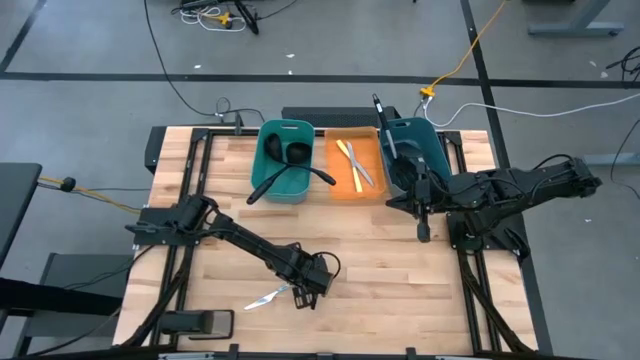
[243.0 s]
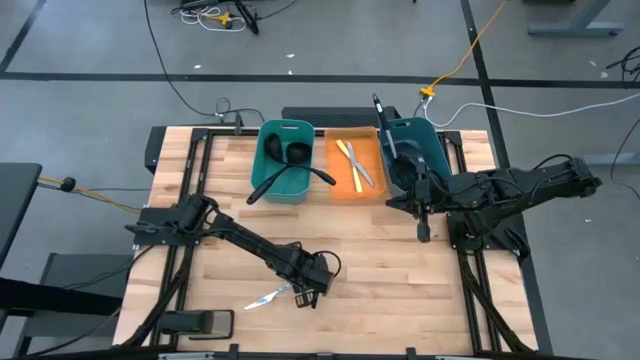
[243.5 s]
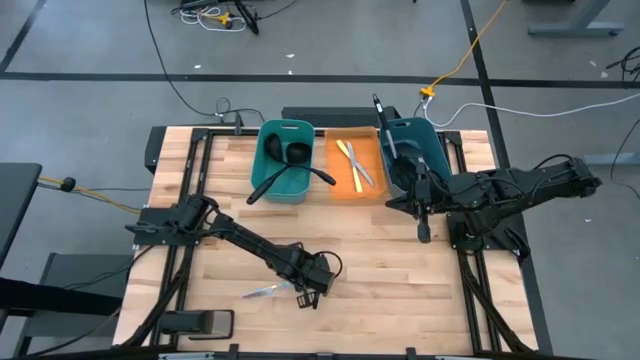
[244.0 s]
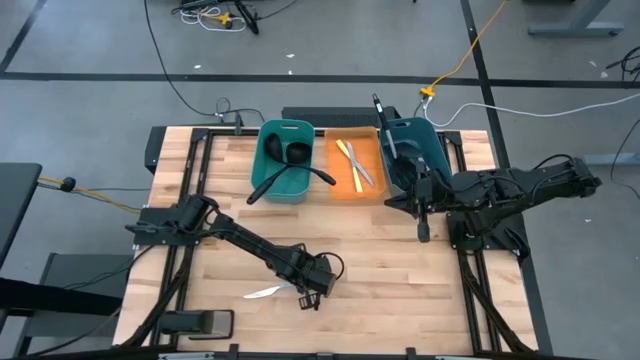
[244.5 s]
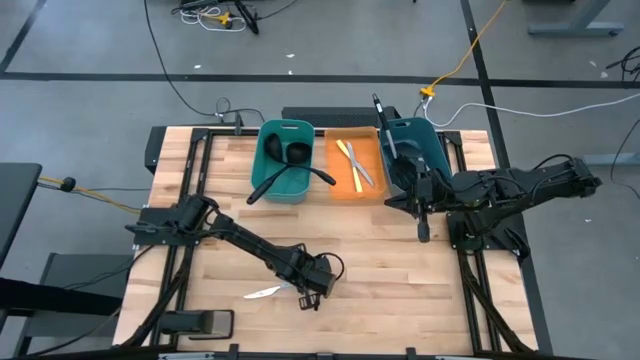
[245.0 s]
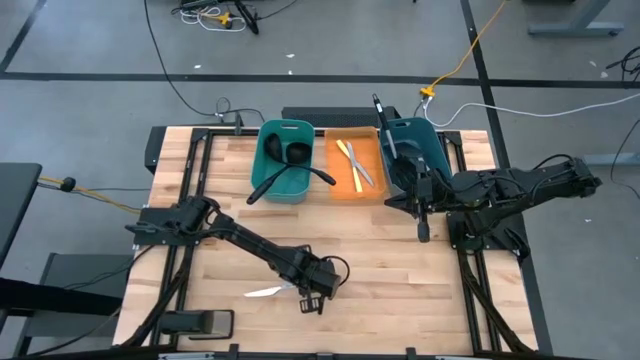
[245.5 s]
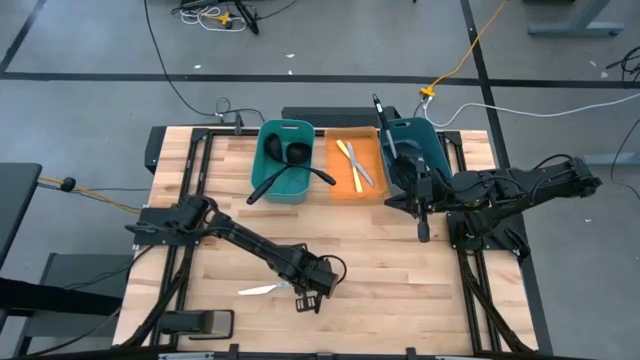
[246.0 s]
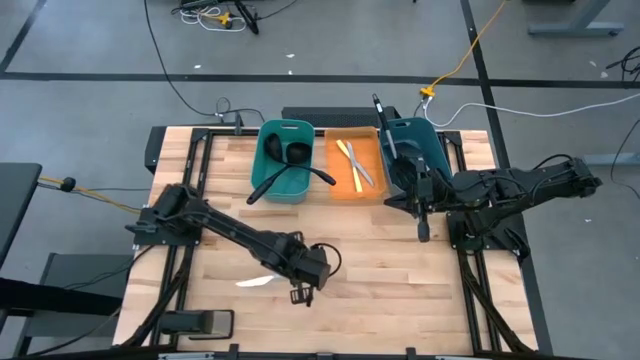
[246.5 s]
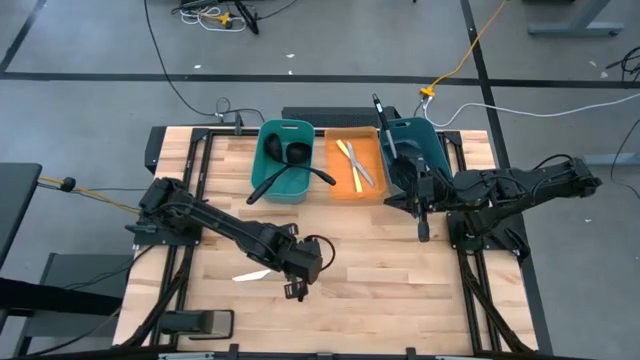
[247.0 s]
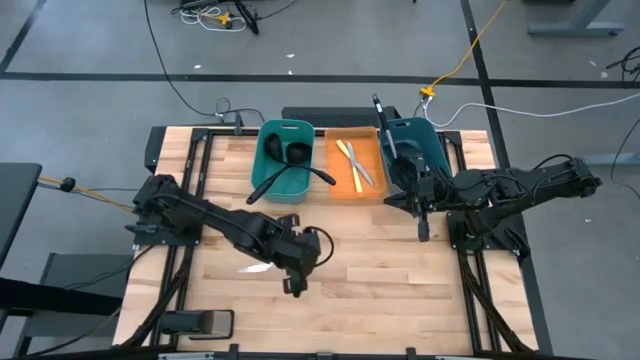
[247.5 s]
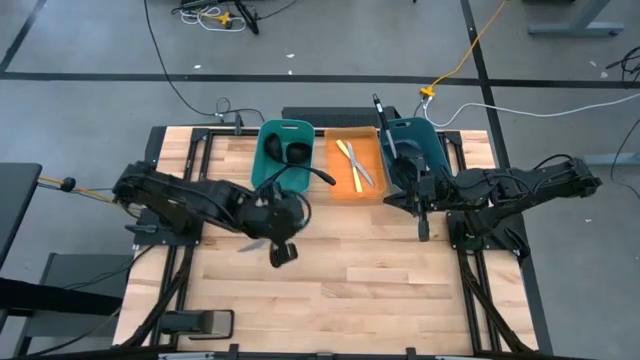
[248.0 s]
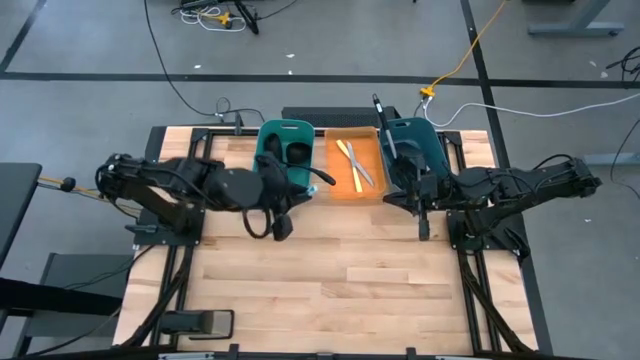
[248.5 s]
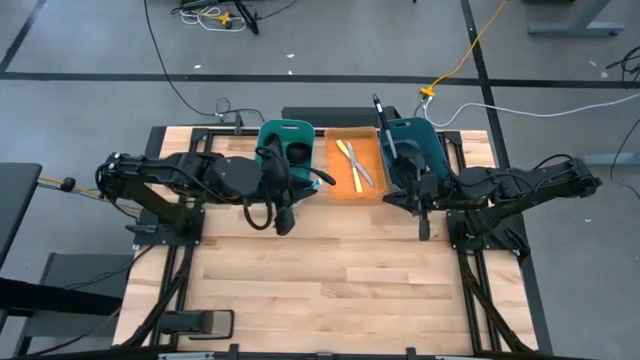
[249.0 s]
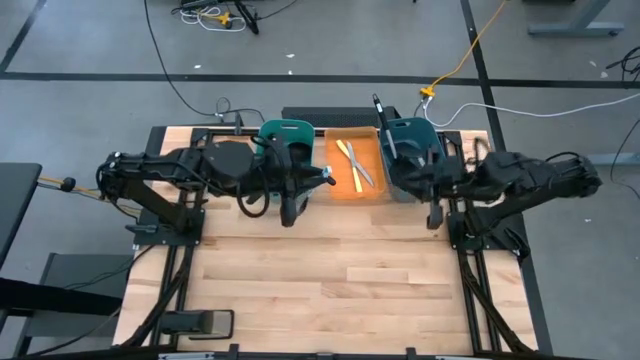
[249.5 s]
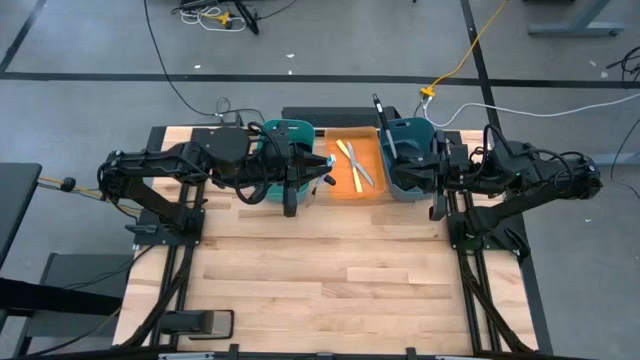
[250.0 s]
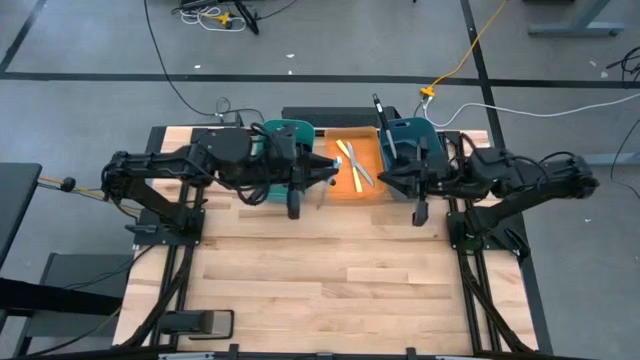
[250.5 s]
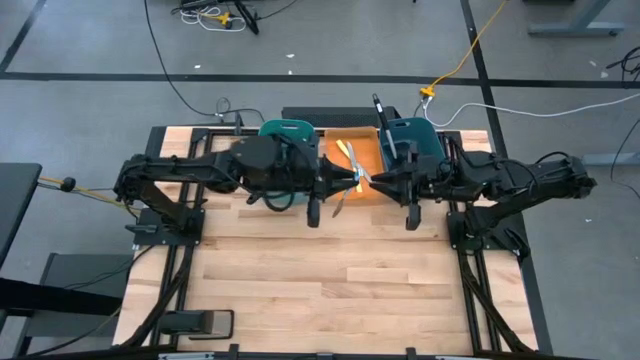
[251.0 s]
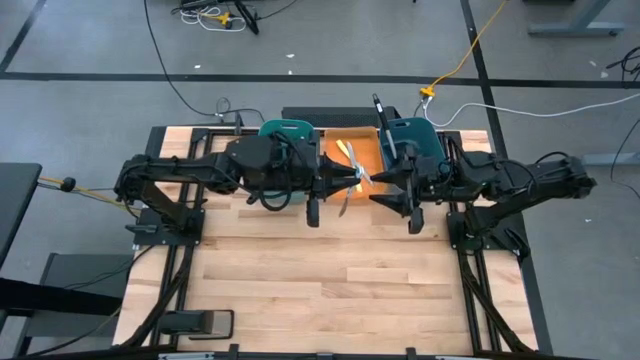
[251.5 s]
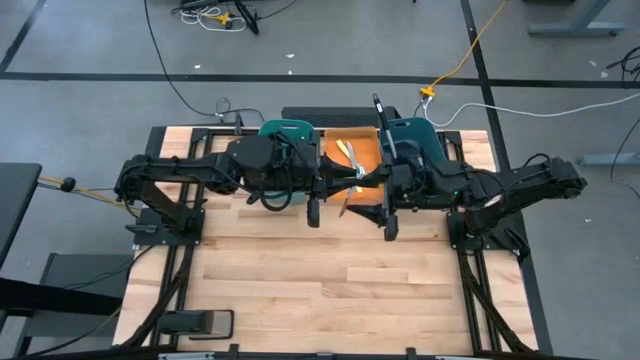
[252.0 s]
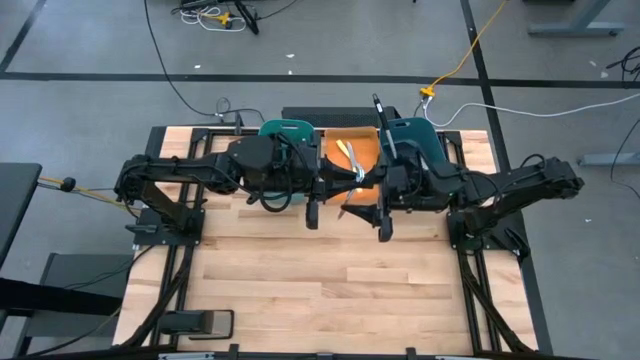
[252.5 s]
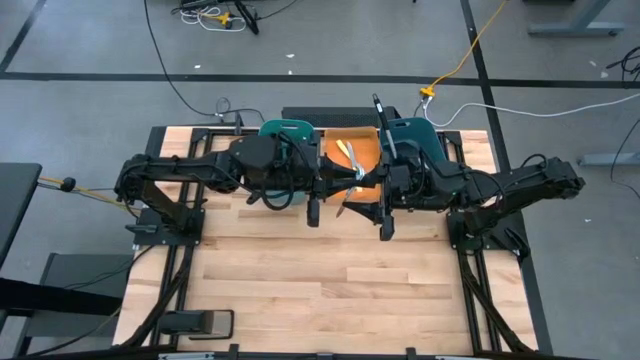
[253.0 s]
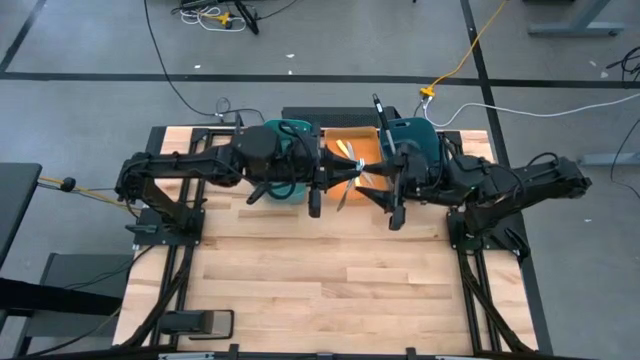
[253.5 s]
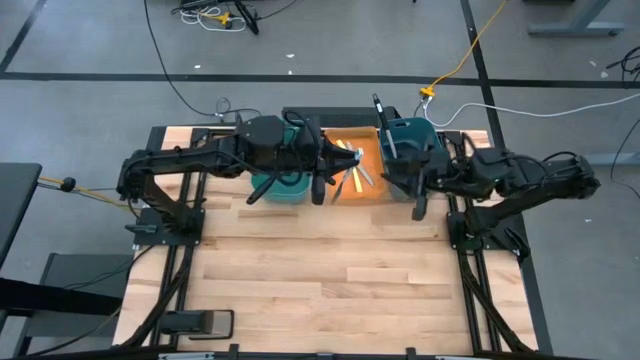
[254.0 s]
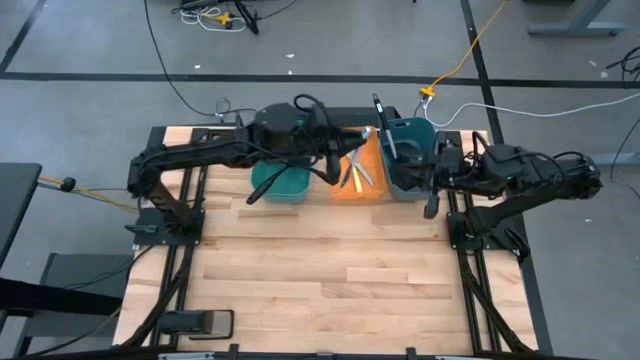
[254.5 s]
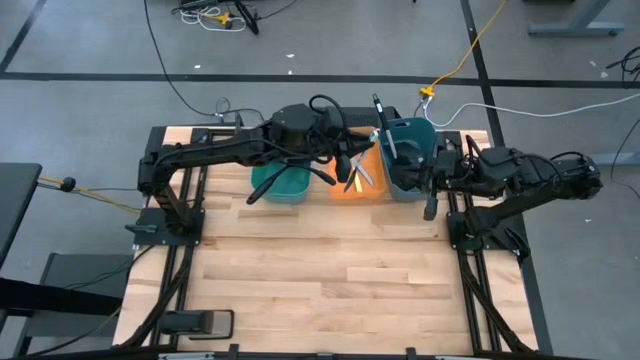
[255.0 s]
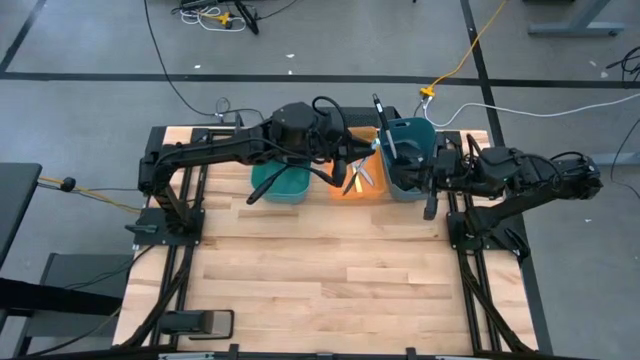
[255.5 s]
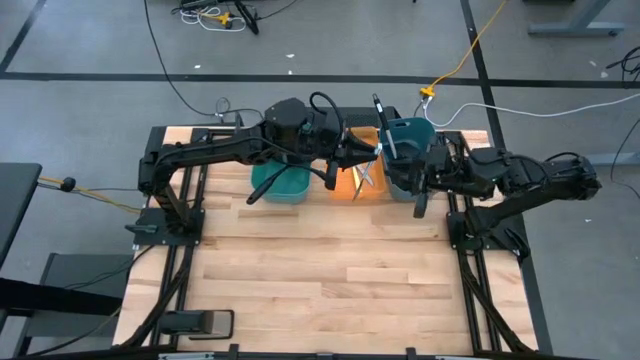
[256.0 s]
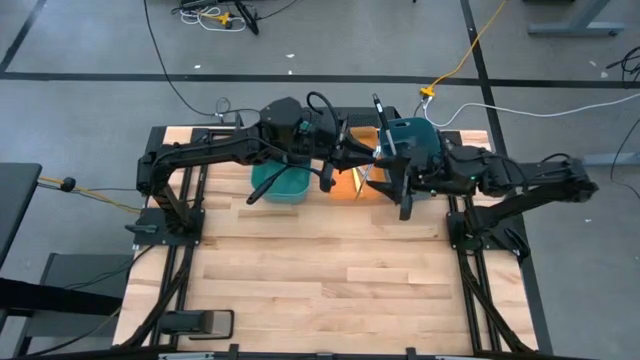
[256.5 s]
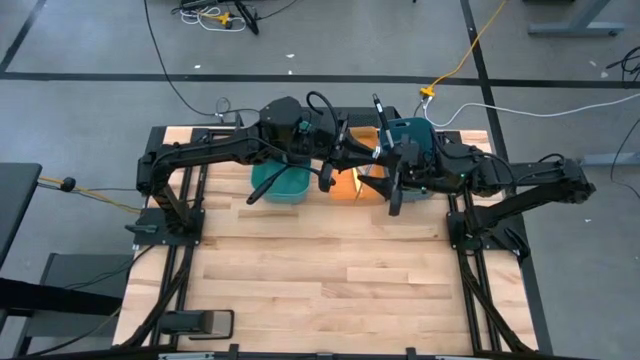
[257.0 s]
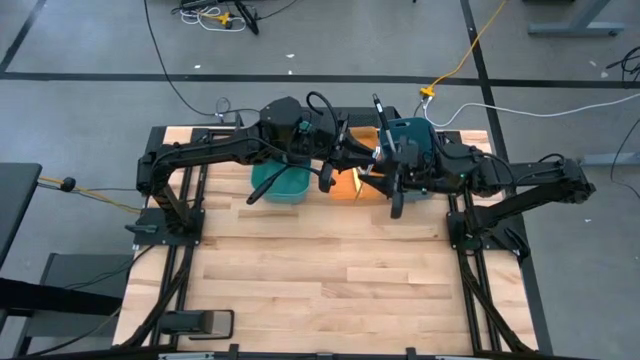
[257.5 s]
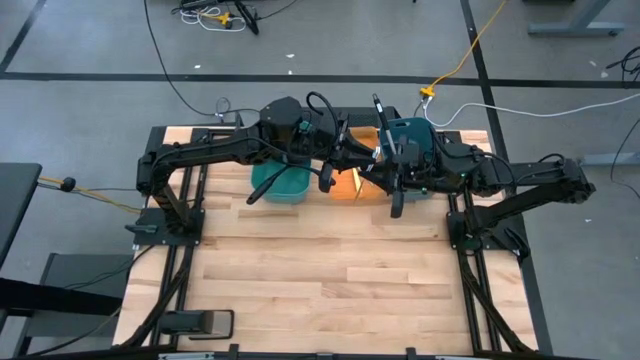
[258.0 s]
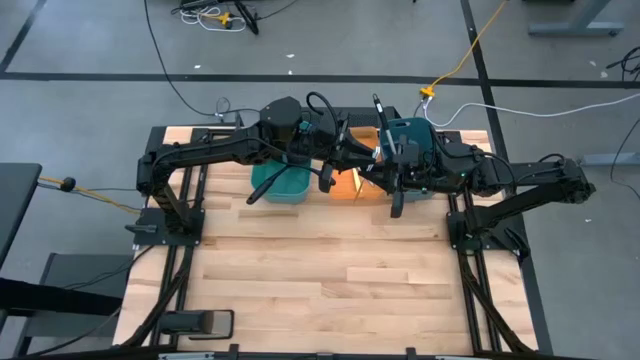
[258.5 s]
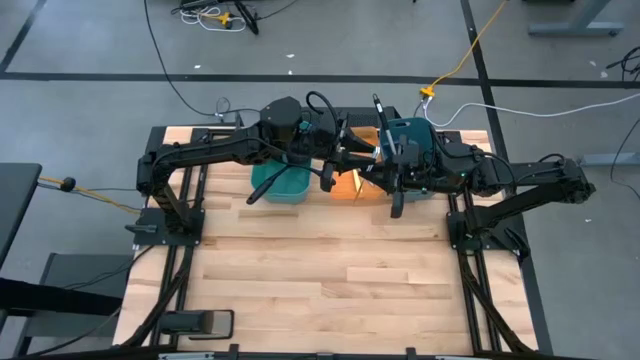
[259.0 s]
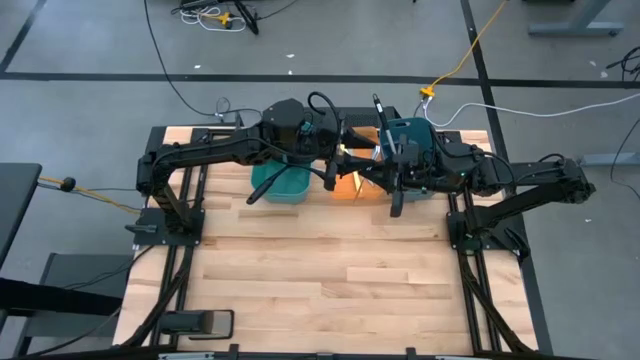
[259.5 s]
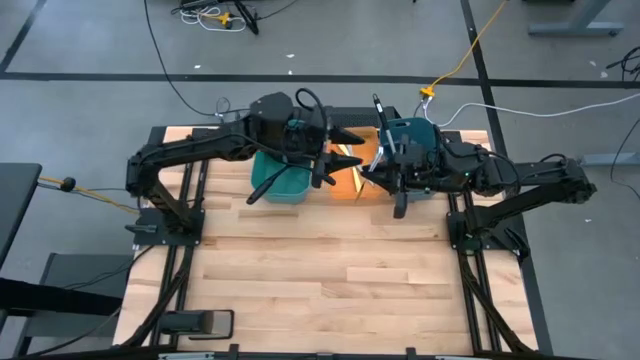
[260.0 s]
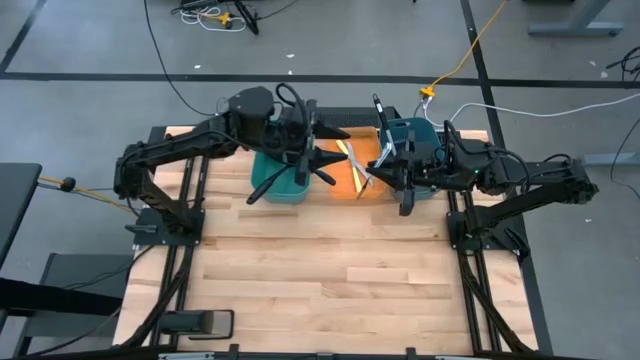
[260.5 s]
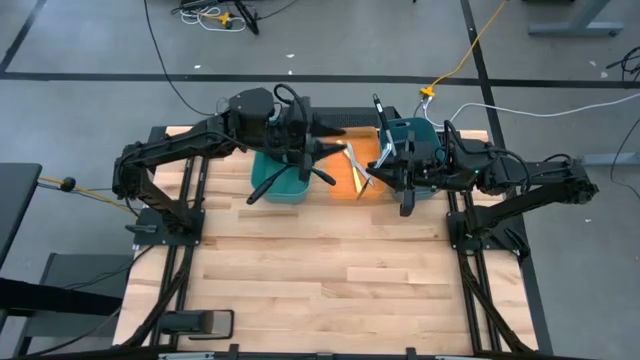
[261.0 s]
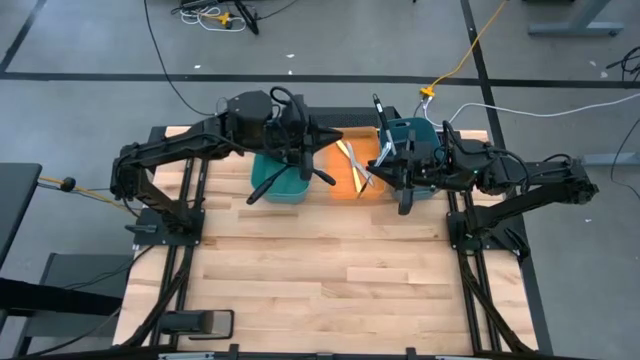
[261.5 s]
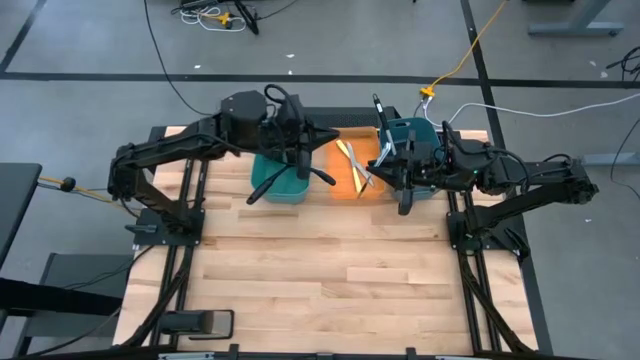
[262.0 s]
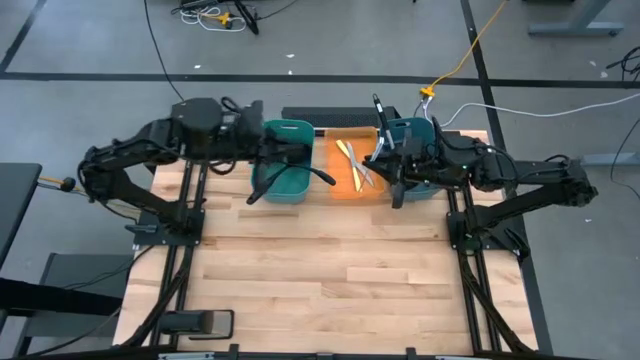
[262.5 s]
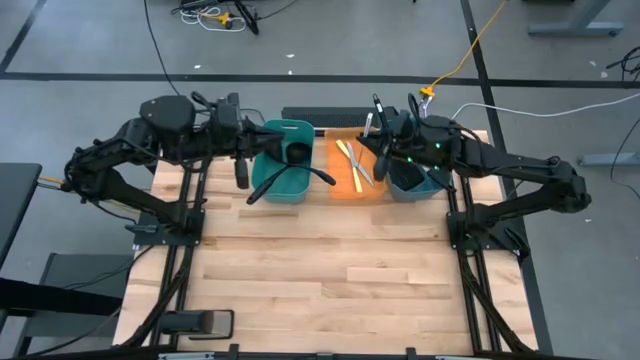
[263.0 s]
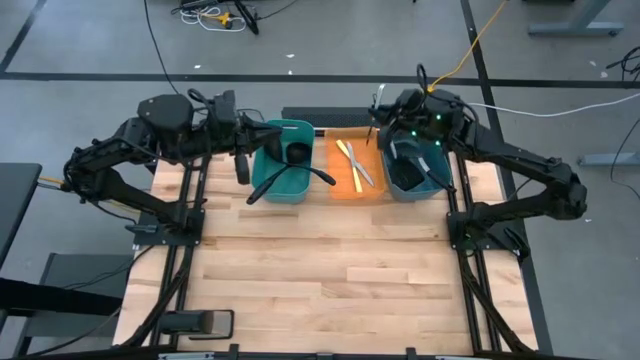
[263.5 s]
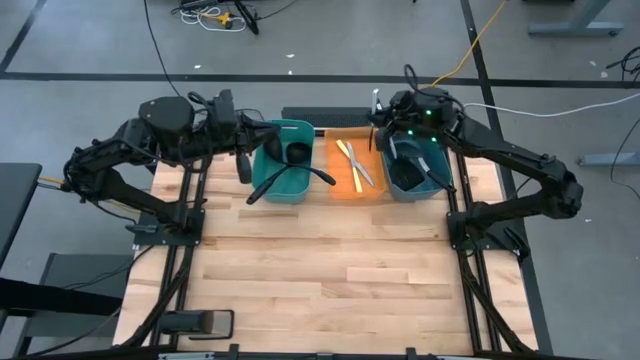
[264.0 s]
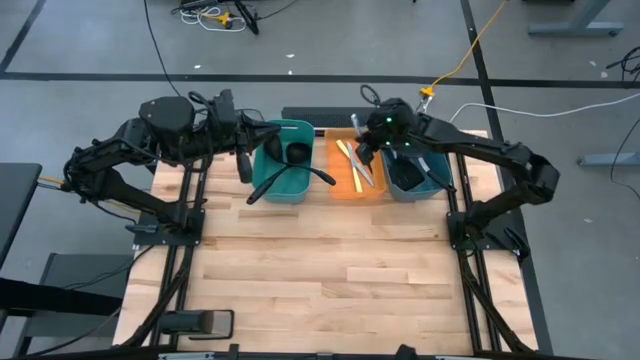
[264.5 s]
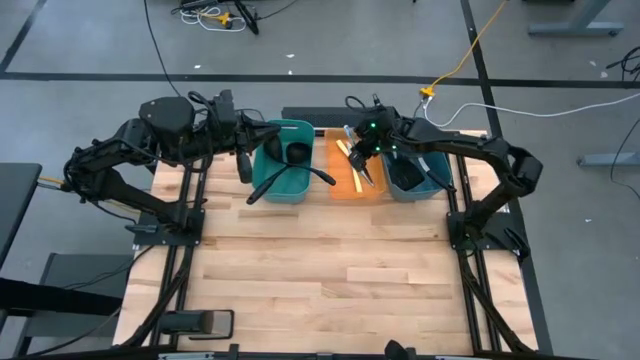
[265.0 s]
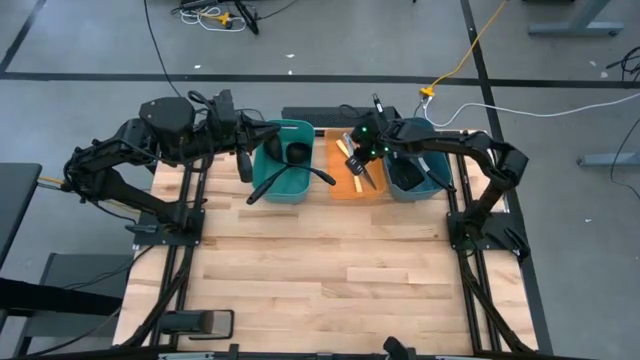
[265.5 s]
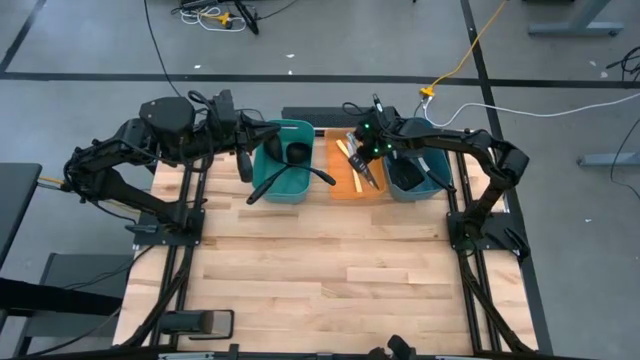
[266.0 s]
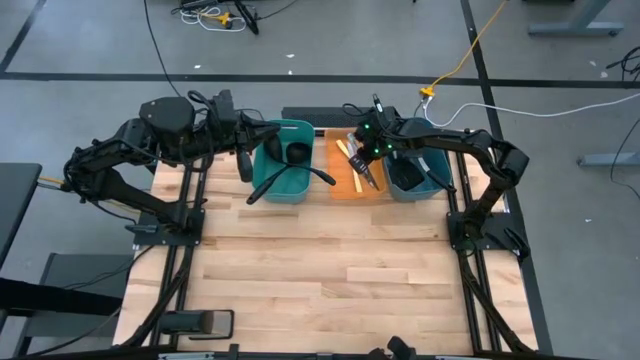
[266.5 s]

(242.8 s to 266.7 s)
Task: Pick & Place Kitchen Items
Put the white patterned table knife into the orange bin
